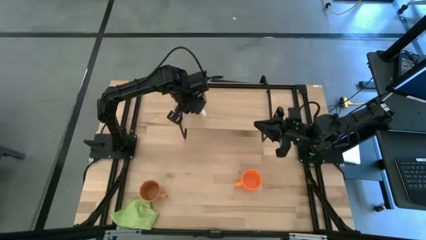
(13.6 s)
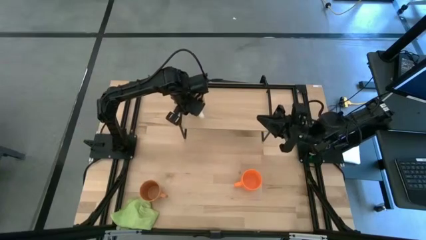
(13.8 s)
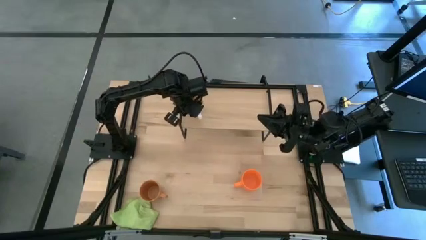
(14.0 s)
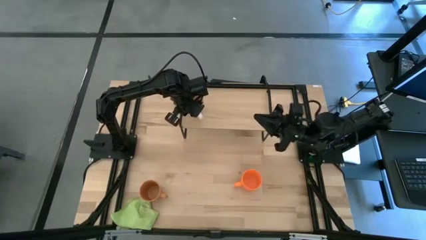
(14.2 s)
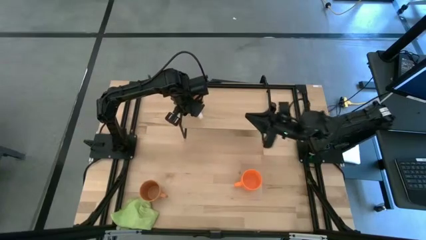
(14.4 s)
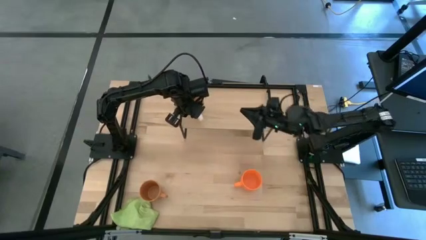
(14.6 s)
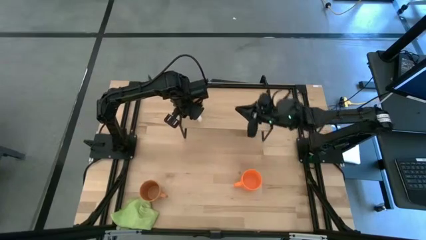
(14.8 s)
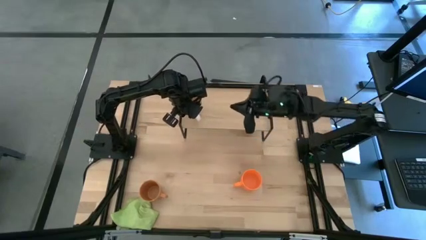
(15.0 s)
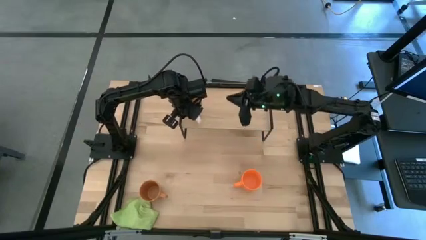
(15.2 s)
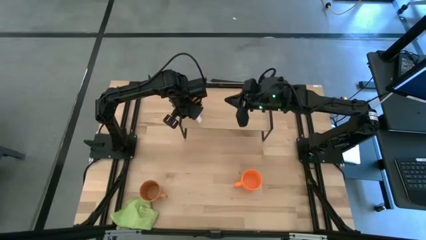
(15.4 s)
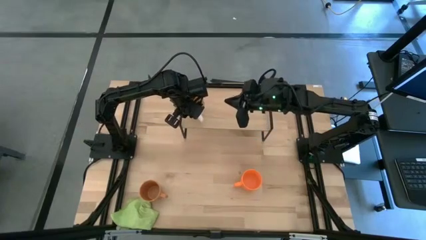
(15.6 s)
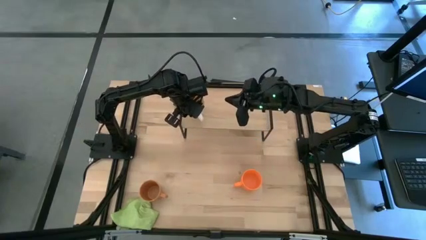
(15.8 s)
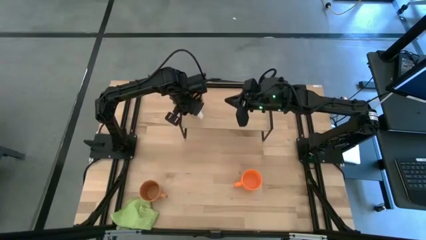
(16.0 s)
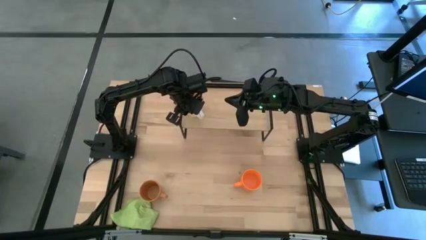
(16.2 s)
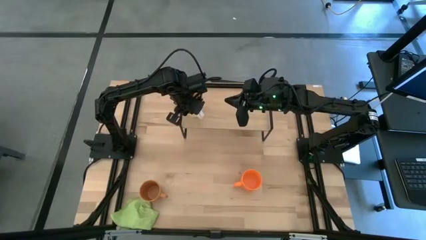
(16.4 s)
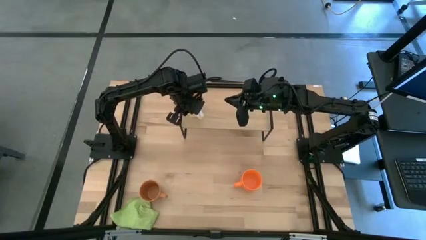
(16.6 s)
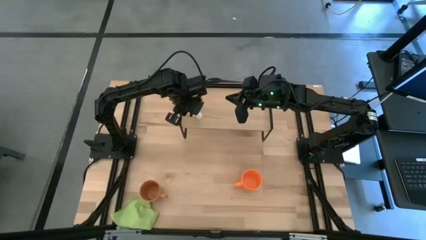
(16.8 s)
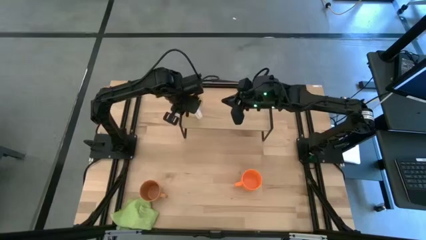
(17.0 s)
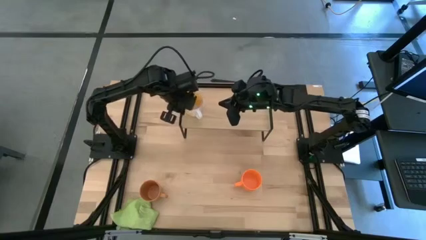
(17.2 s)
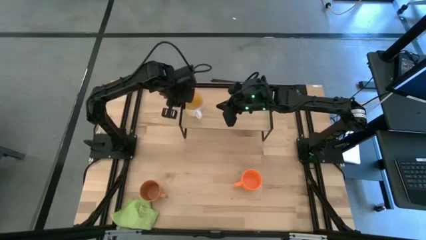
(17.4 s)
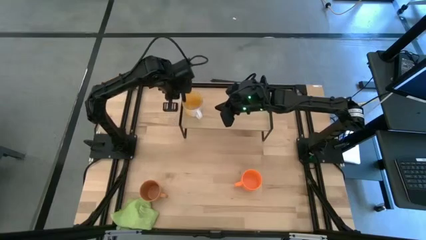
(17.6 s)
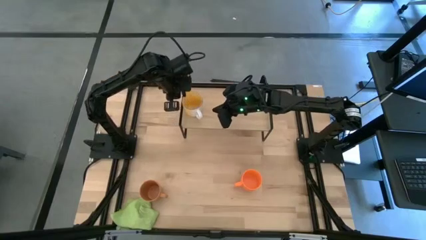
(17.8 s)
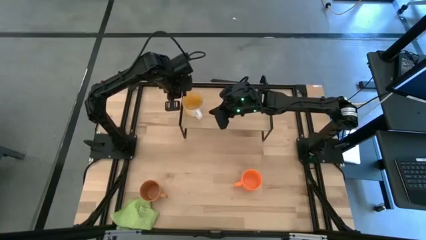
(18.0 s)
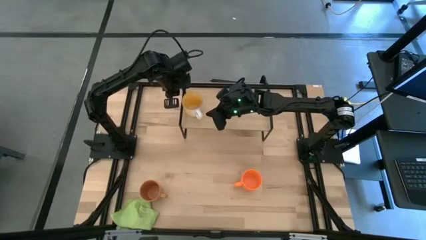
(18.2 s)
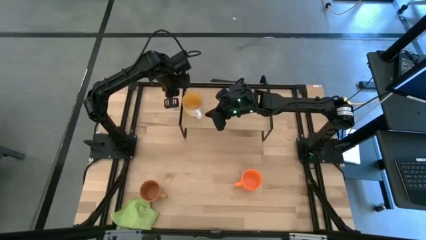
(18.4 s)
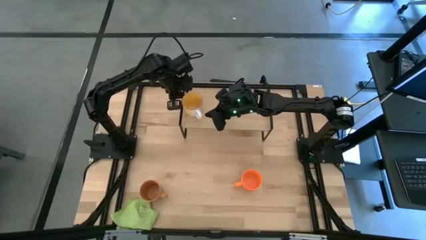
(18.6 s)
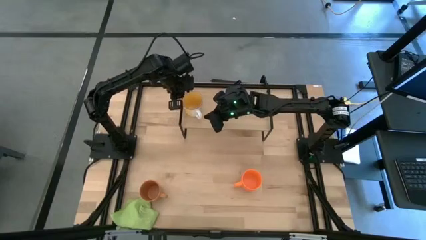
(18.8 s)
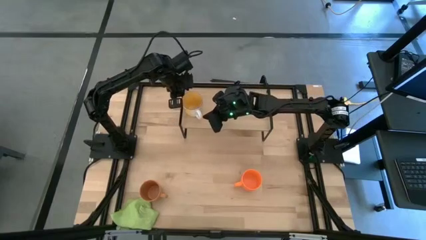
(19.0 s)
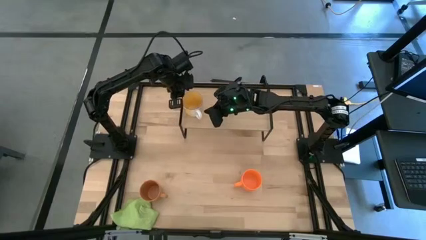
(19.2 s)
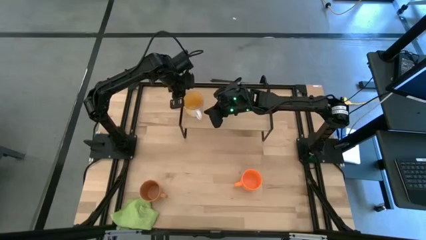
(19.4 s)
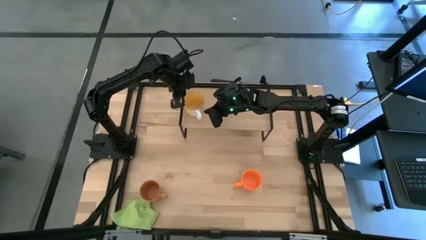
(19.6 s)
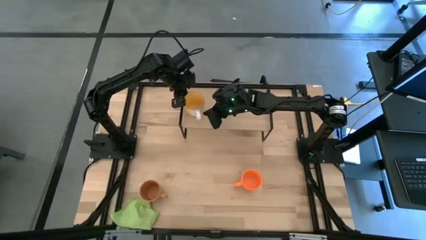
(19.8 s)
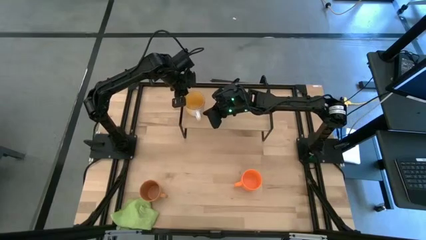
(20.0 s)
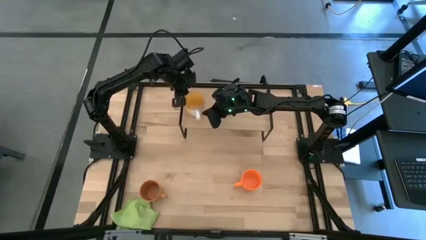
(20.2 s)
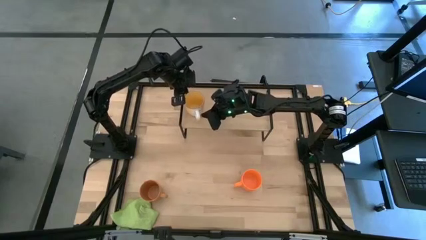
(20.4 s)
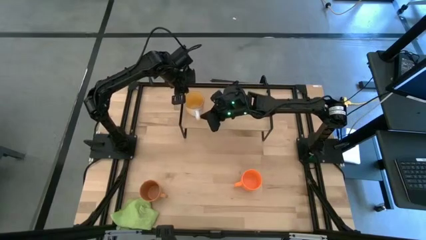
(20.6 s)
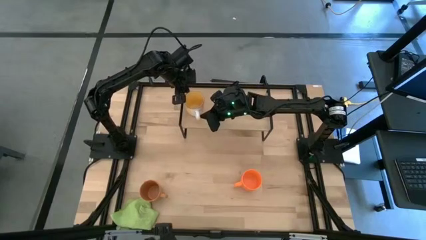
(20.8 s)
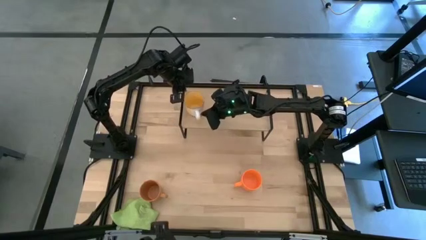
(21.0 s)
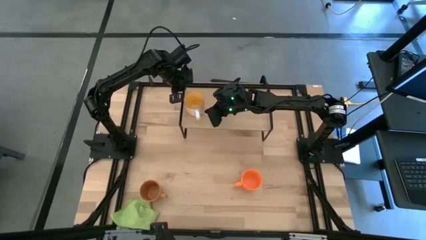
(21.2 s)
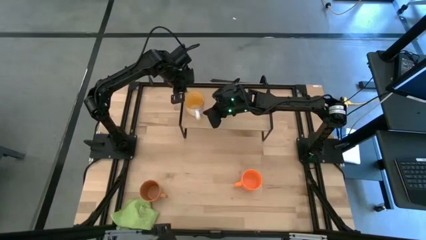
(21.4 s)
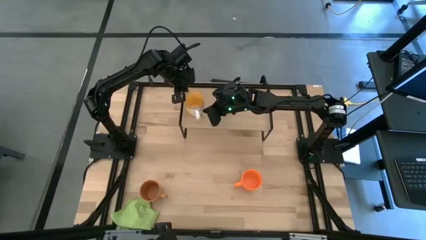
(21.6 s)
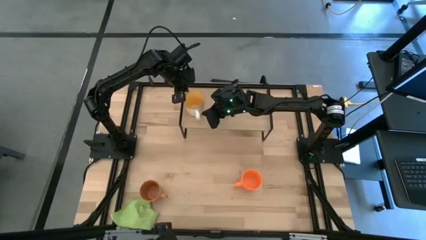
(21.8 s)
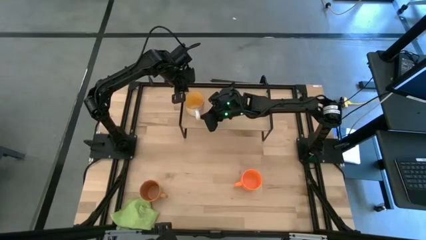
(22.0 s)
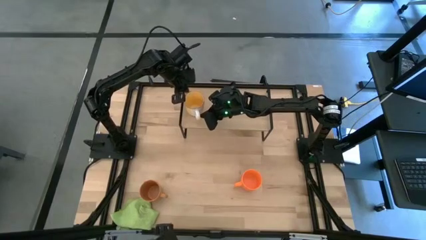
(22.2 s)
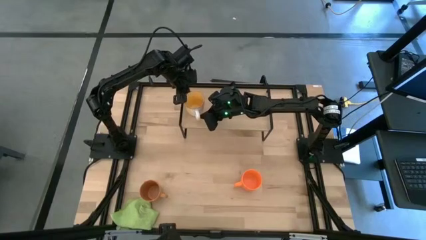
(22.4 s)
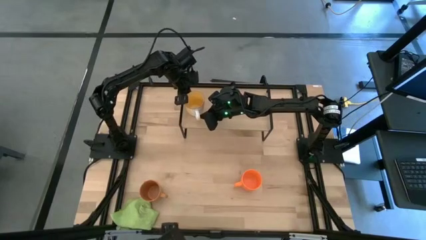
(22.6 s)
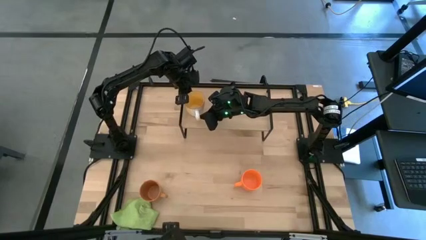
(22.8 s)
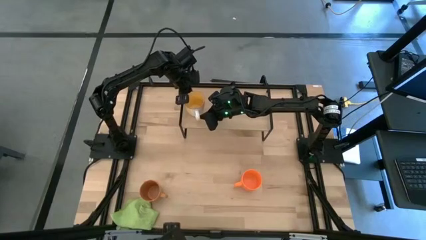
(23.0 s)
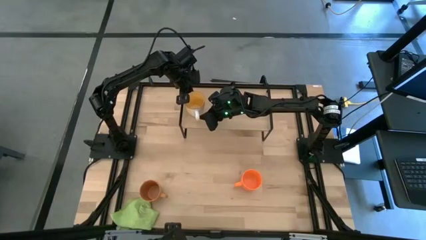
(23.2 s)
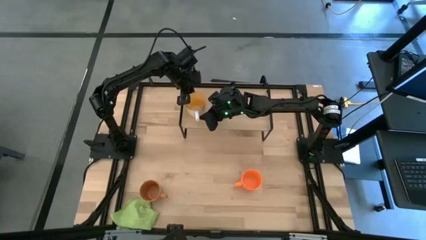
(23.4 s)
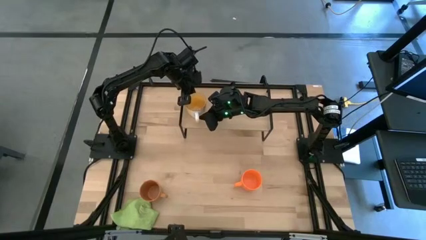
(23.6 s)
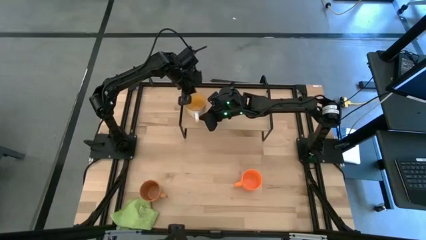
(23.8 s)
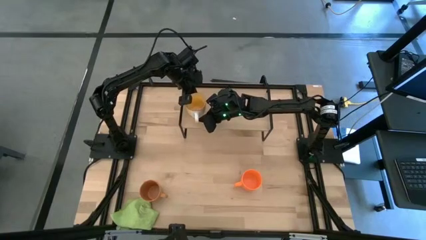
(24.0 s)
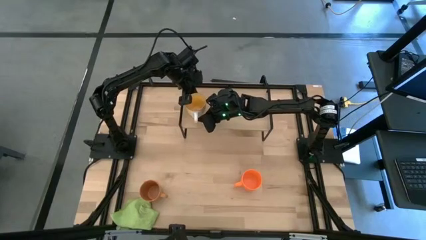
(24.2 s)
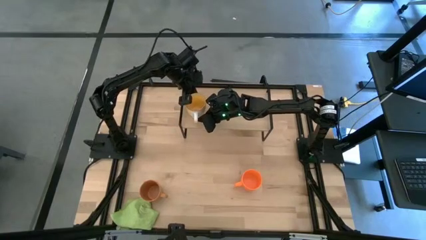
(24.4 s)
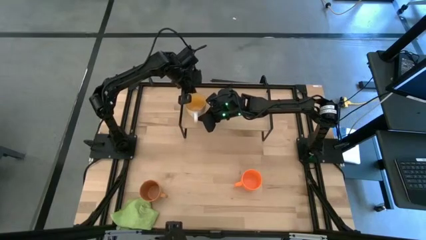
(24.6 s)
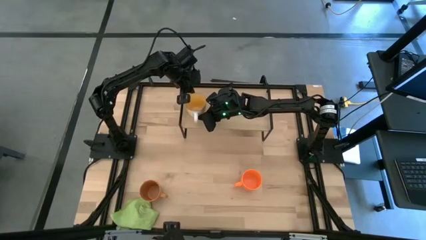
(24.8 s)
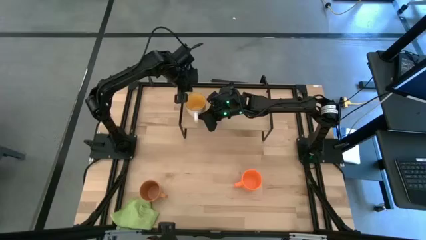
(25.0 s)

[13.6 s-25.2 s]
Task: Stack small to large cups/mugs on shelf
Put the yellow mug on the shelf

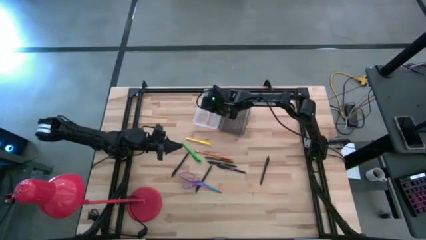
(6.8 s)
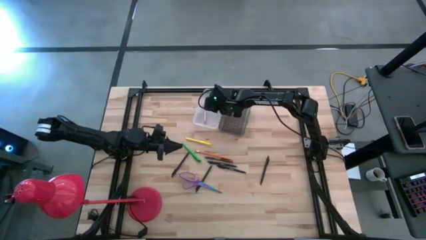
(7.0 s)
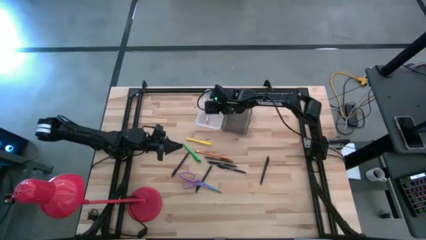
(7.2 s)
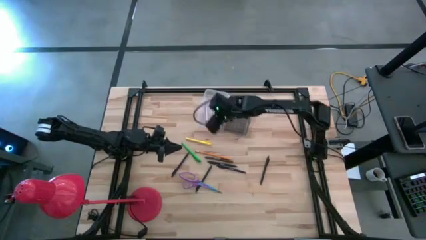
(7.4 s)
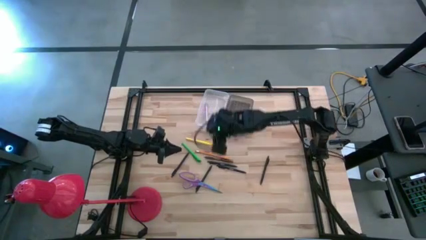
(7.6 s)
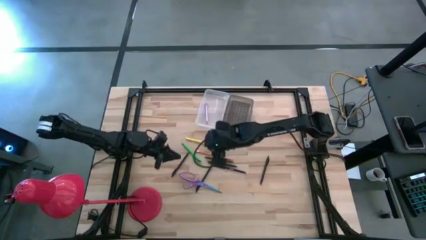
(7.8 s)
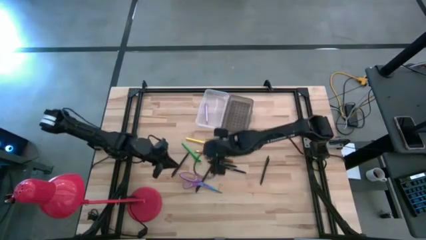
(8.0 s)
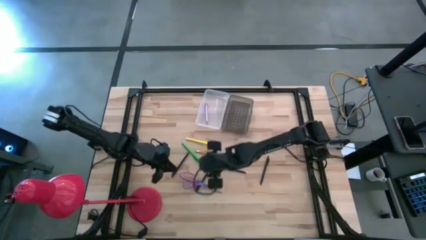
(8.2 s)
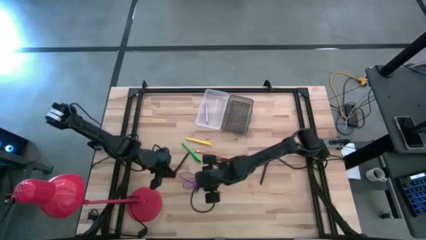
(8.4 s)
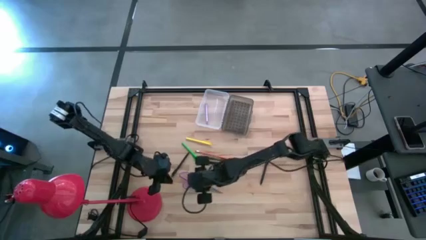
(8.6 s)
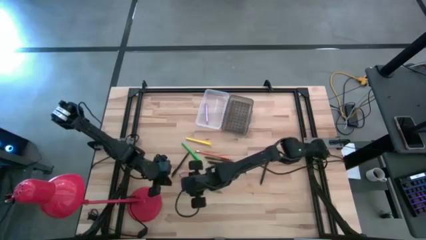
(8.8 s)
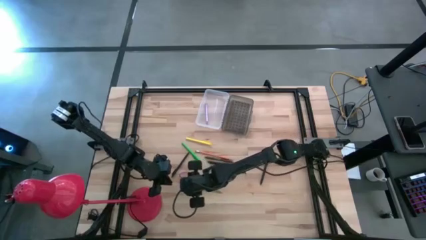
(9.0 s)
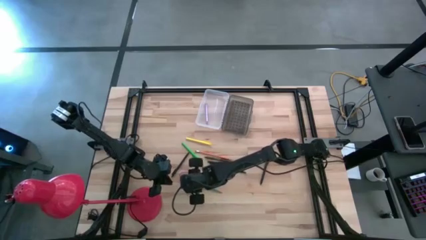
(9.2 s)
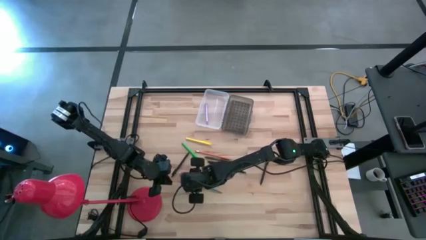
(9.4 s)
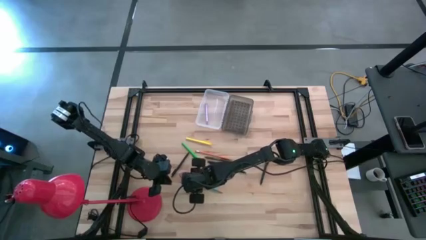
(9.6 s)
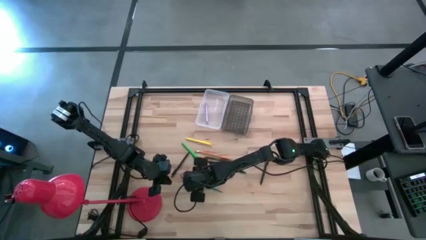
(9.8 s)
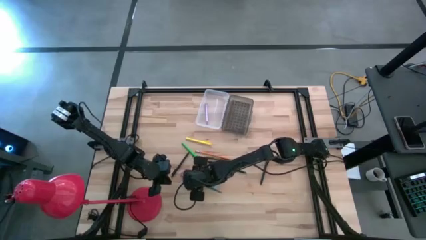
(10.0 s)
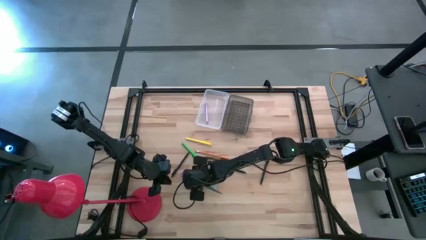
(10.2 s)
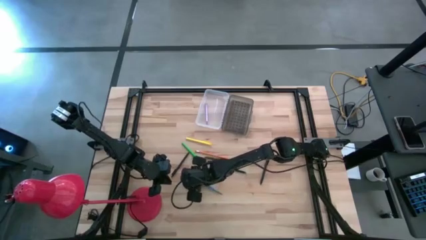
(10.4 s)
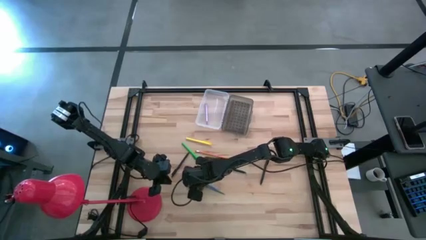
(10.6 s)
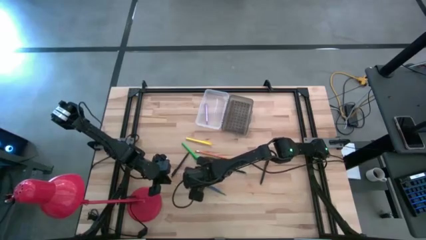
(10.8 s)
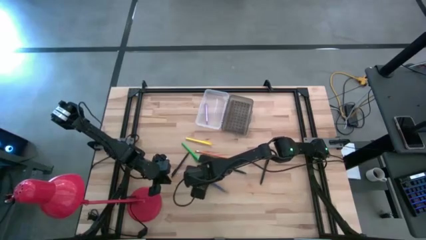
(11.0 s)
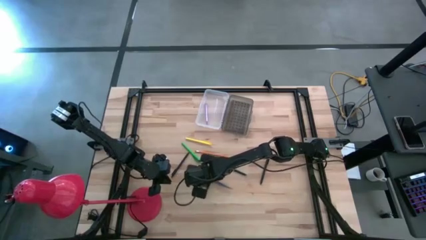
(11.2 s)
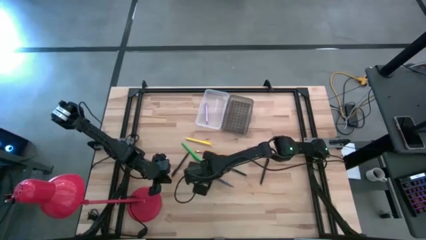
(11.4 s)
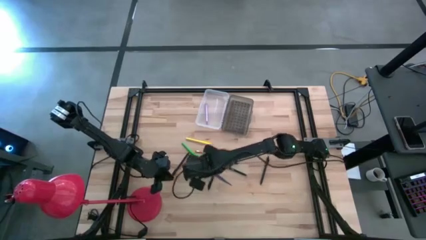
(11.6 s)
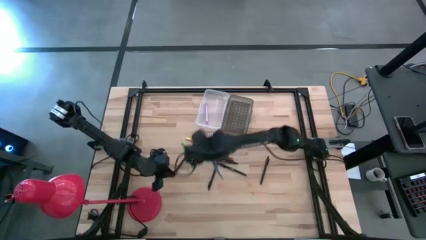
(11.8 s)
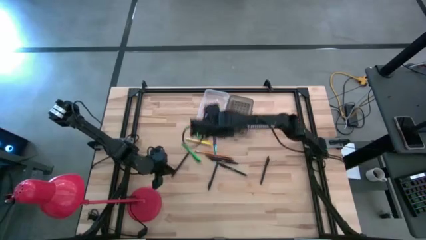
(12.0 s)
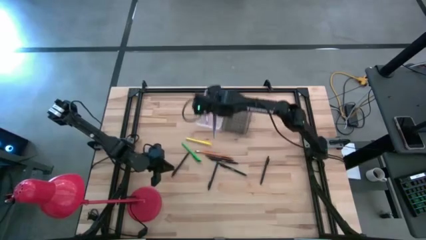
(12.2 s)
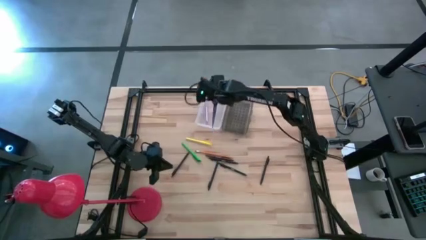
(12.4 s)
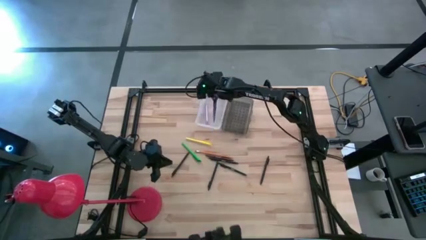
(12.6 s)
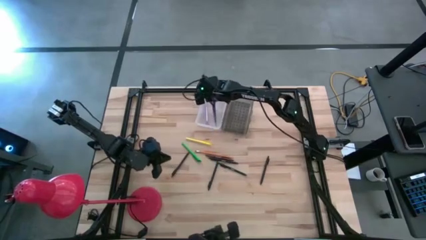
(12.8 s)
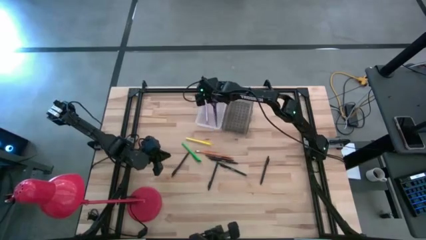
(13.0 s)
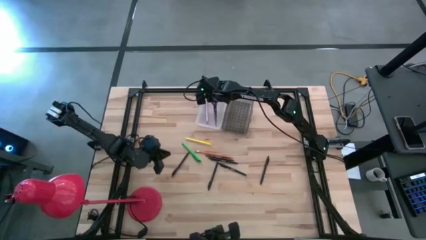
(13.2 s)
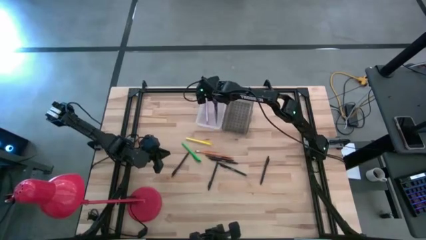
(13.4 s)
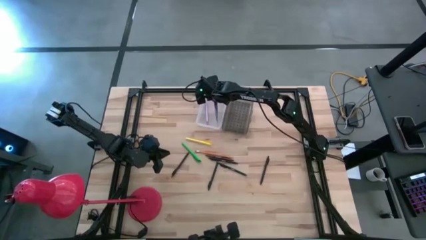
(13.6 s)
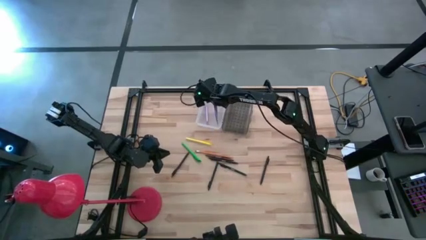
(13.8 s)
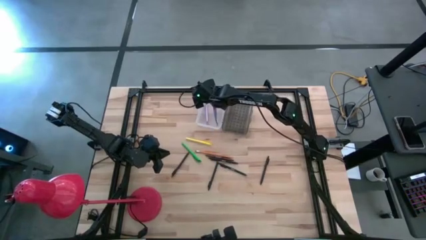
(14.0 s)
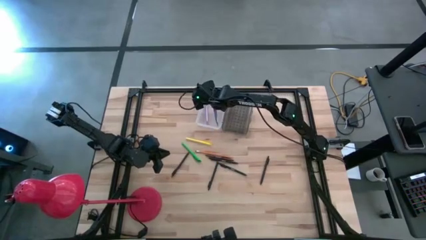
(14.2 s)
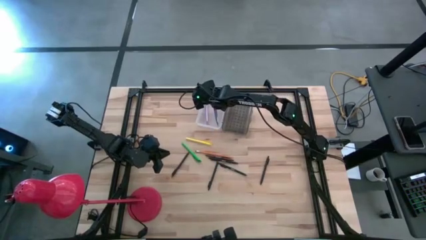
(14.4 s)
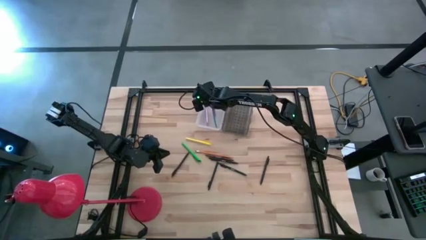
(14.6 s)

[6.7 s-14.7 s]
Task: Pick & place school supplies into a supply box
Put the purple scissors into the transparent supply box
